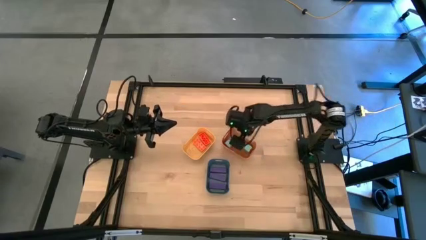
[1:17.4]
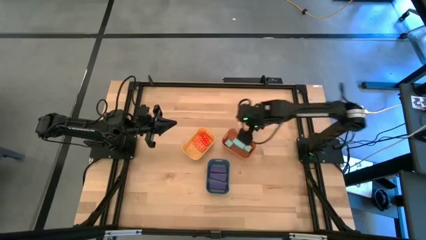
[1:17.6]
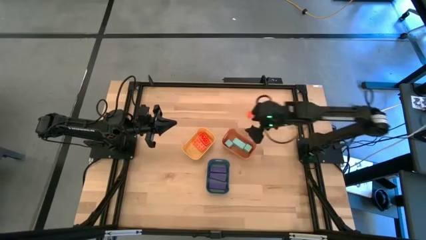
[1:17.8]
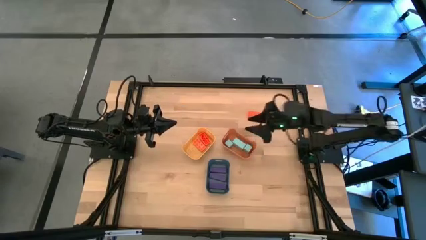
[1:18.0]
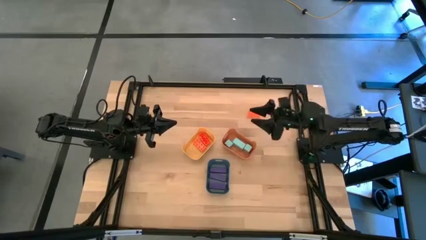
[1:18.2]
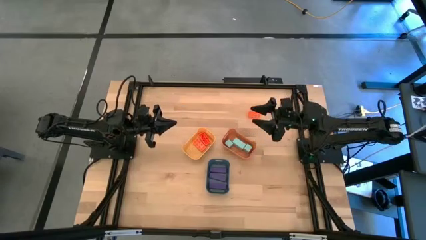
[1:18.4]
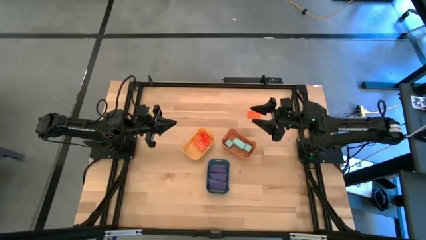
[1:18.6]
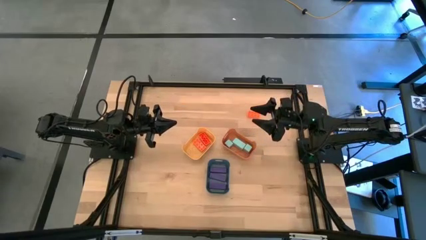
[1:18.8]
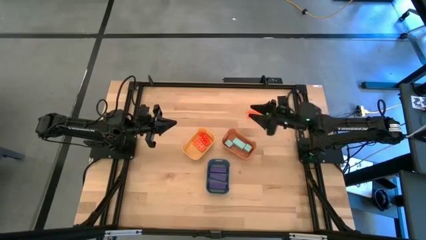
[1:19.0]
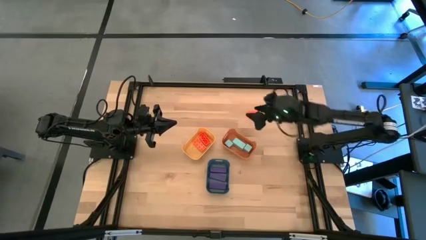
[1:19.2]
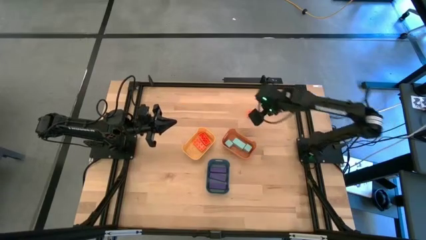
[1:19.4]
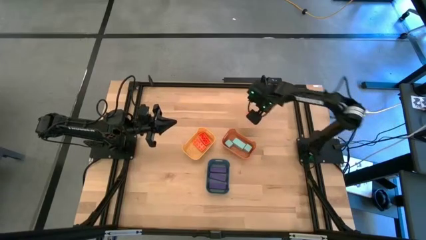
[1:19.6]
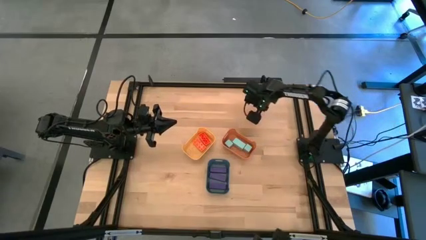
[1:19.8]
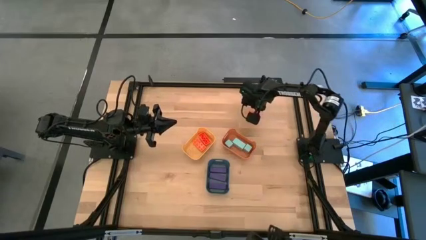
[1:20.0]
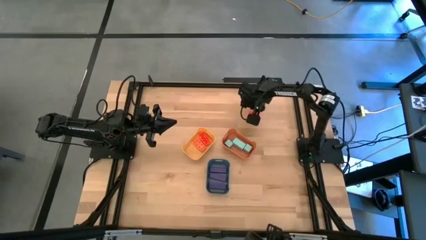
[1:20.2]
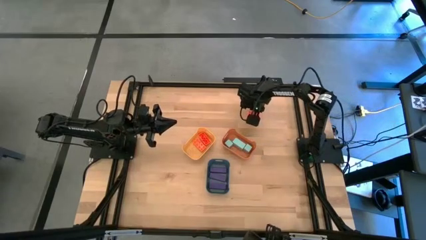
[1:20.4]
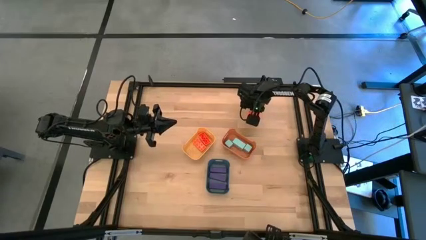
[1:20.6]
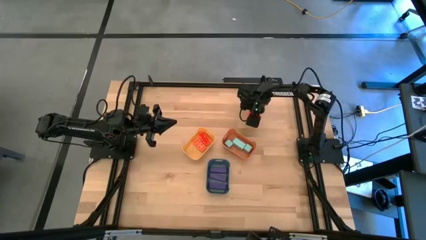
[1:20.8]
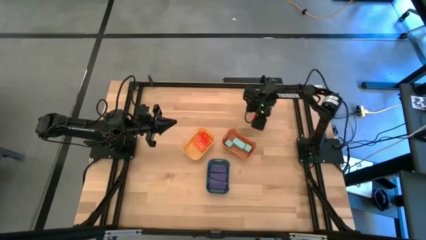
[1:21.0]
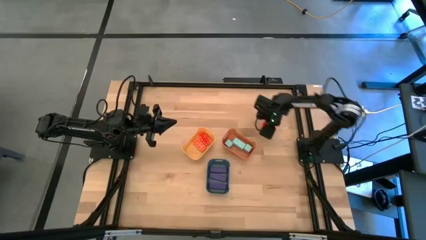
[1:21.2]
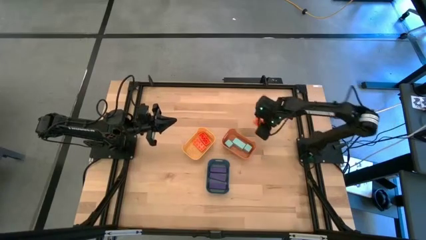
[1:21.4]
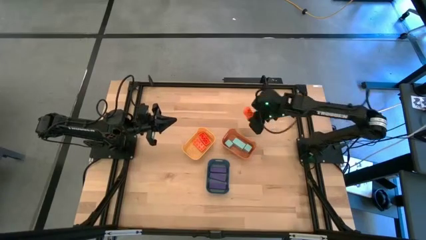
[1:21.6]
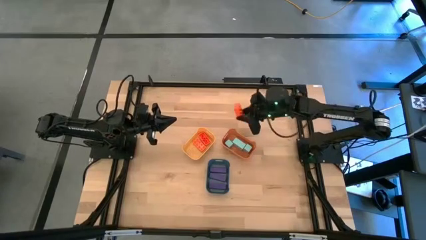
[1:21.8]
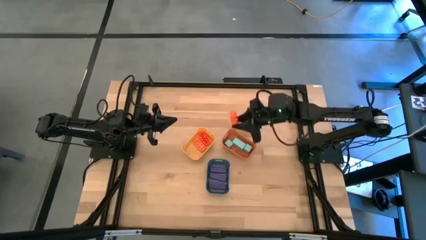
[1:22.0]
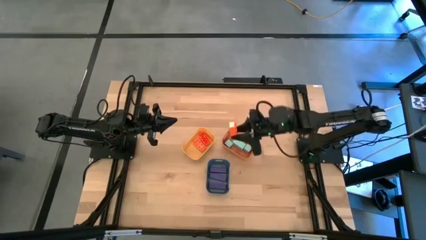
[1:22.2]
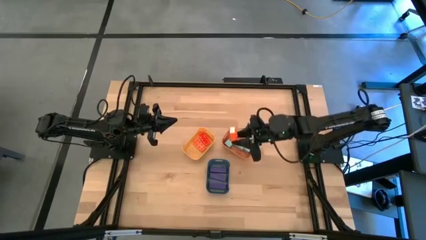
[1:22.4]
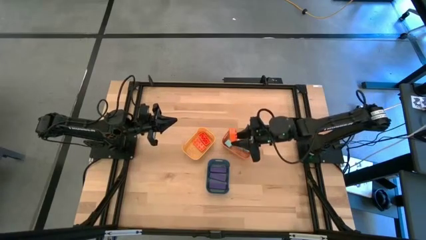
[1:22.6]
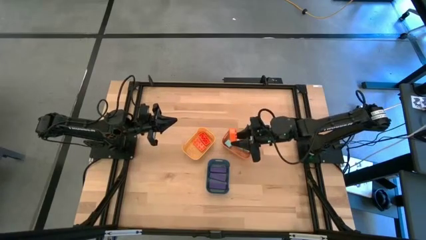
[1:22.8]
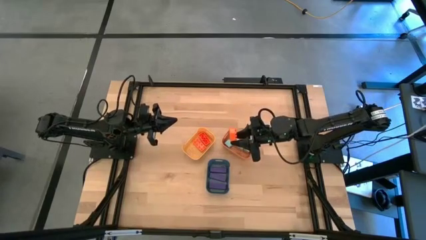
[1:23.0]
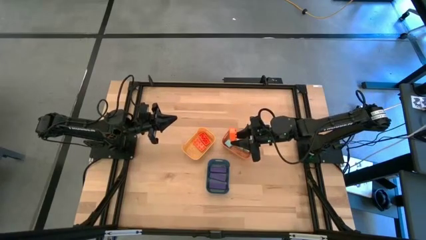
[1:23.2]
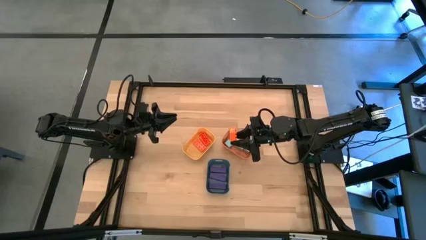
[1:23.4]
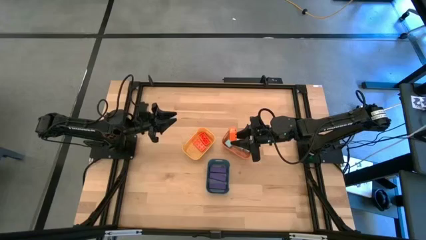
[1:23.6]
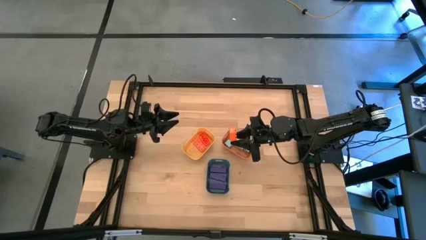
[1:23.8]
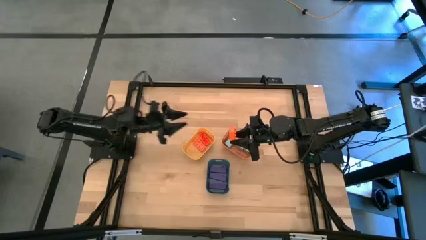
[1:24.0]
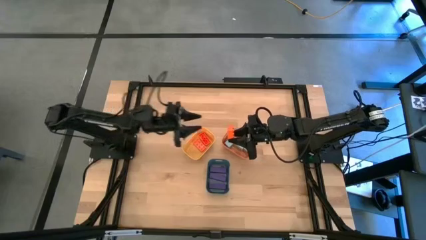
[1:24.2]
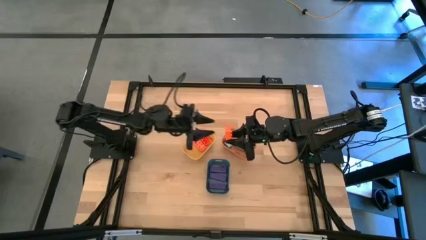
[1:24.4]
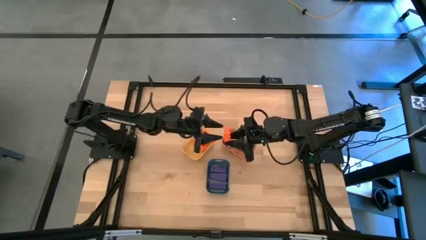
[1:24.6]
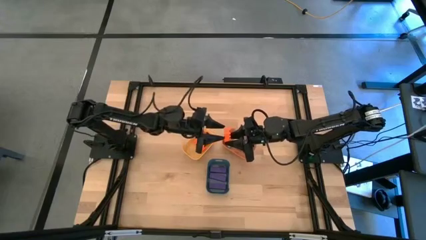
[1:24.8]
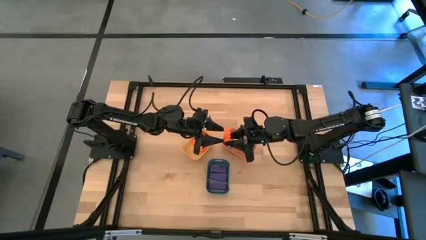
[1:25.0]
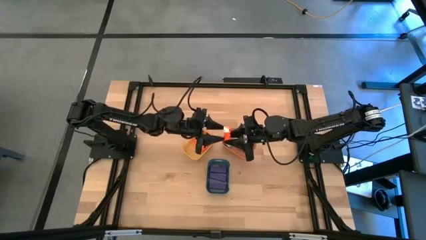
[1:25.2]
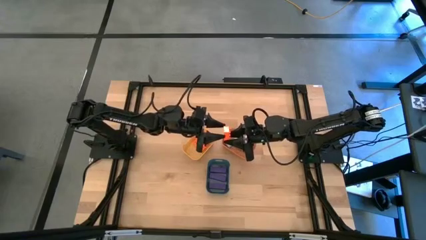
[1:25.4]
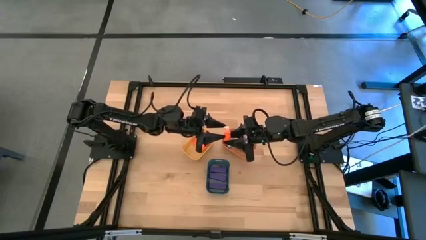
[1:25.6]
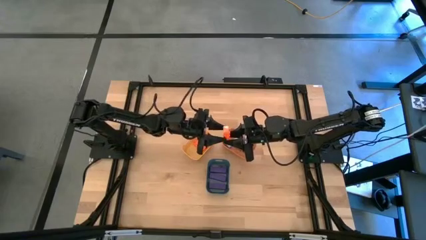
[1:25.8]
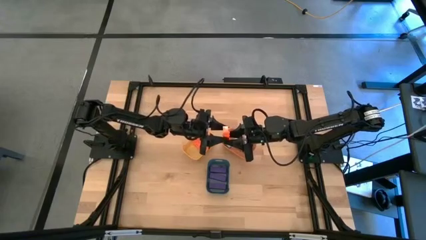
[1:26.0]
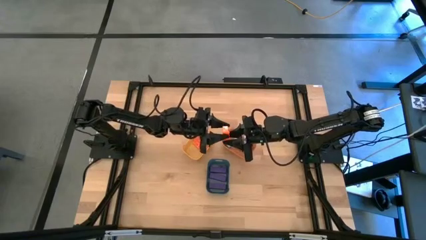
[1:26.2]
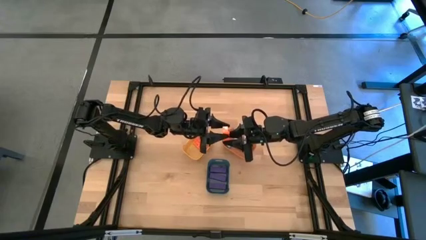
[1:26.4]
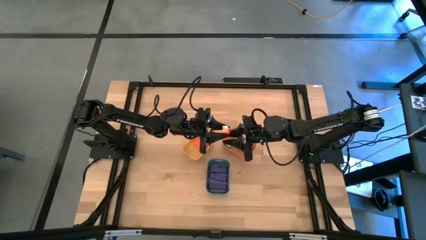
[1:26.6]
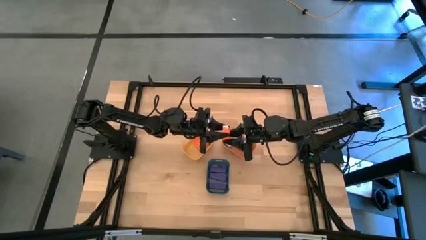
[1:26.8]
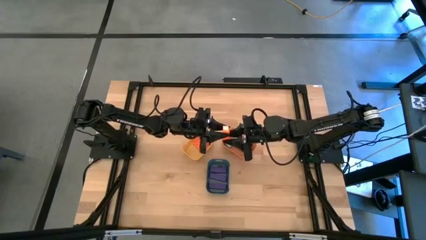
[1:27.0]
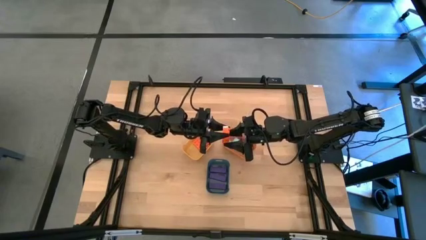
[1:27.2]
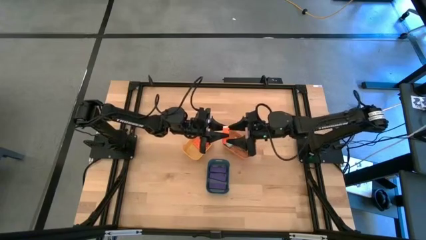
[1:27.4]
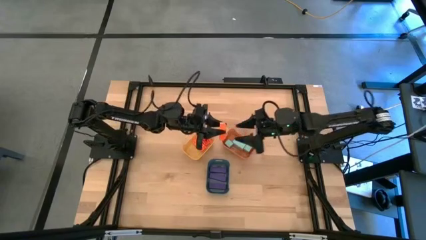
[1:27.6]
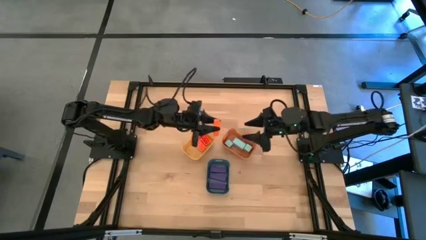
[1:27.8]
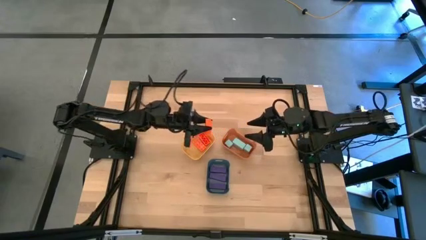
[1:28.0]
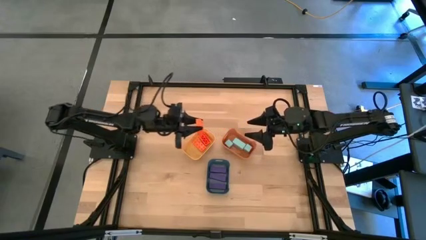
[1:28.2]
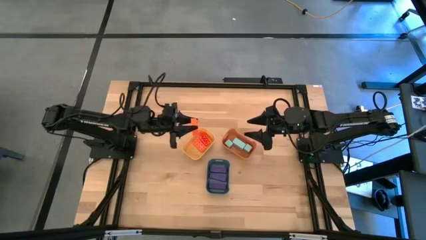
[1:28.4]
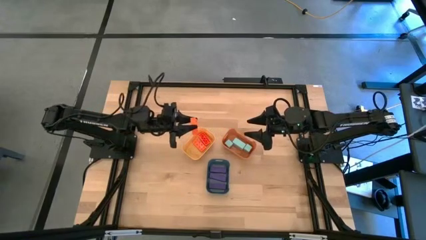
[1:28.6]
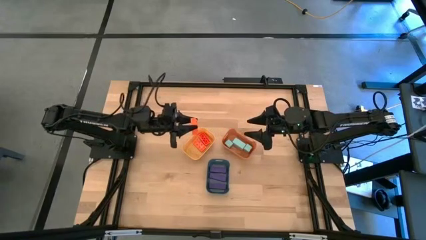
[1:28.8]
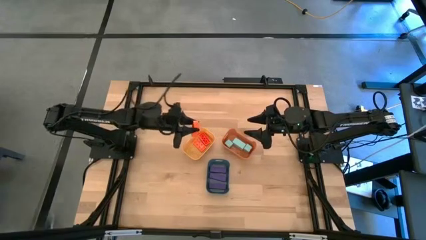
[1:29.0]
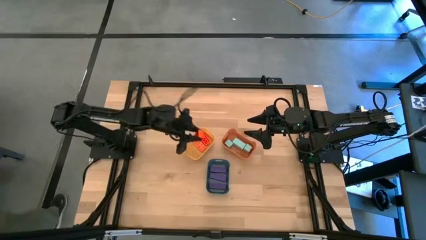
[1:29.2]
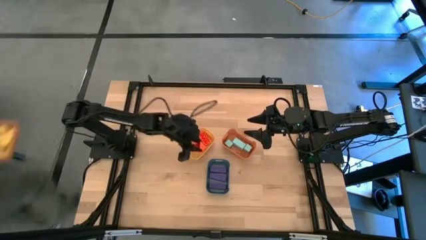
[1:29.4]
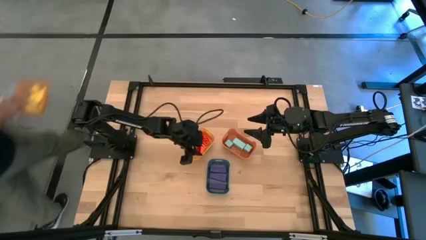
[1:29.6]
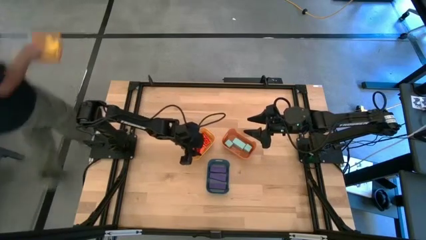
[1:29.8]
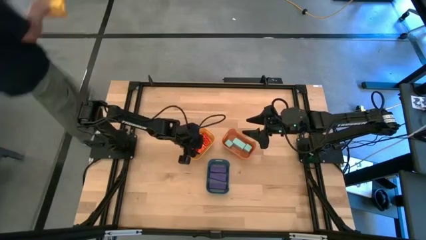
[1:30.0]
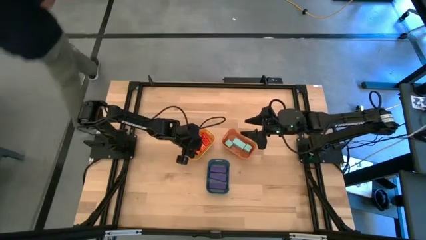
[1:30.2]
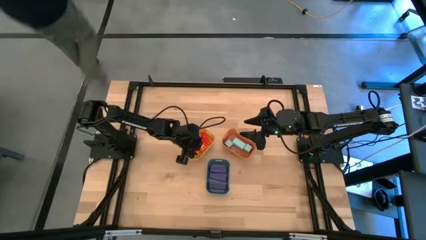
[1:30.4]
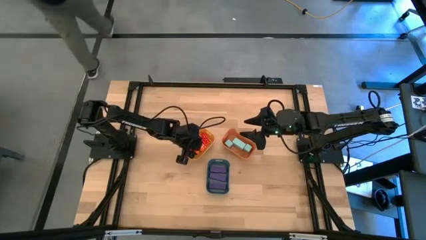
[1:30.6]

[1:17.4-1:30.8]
Task: Sort & place blocks by color
Put the orange studded block into the yellow bin
